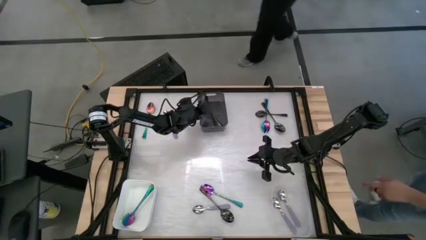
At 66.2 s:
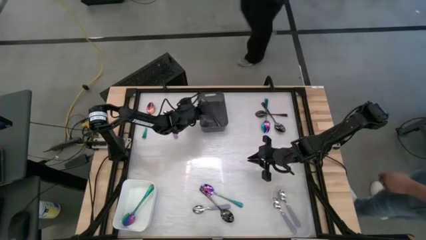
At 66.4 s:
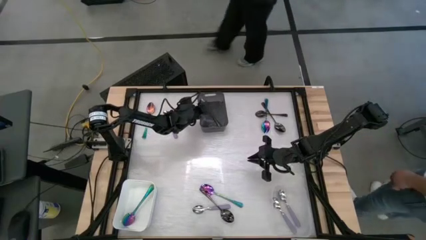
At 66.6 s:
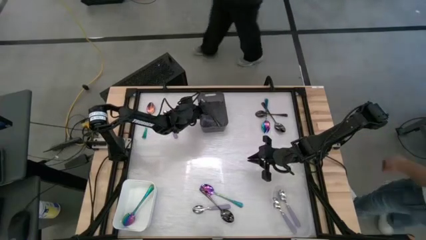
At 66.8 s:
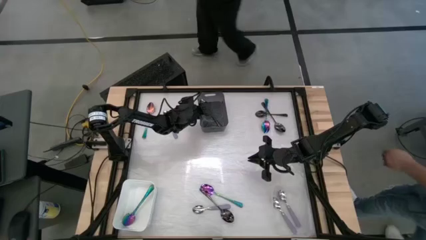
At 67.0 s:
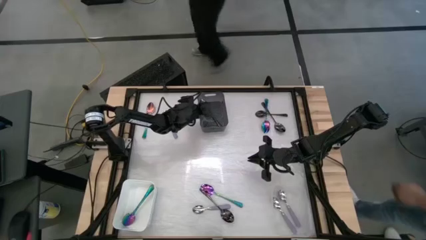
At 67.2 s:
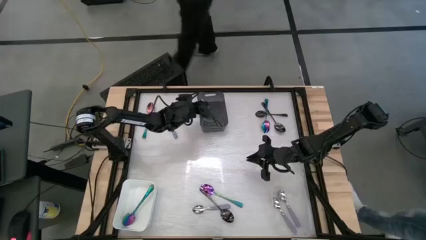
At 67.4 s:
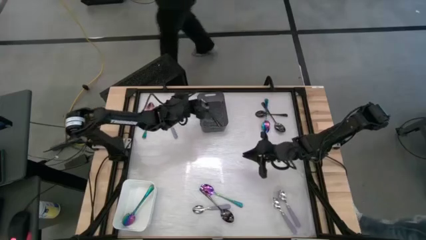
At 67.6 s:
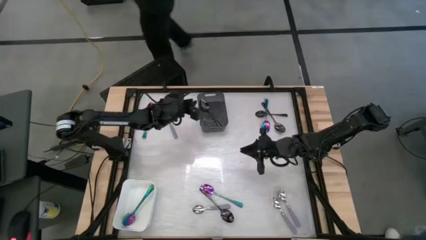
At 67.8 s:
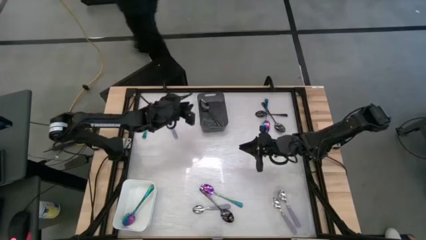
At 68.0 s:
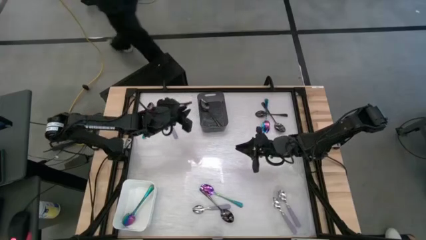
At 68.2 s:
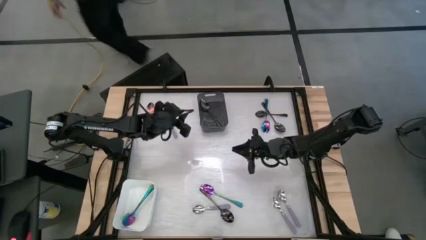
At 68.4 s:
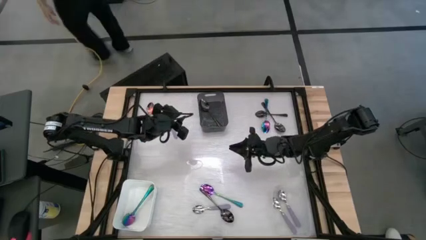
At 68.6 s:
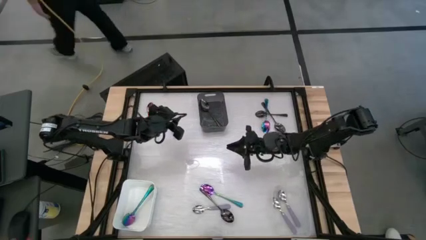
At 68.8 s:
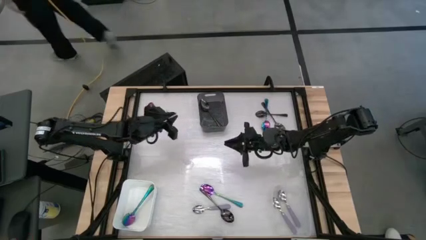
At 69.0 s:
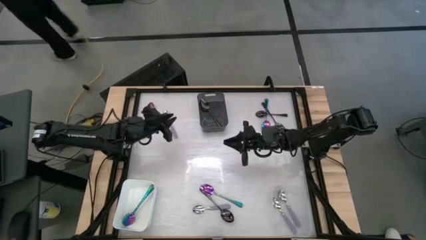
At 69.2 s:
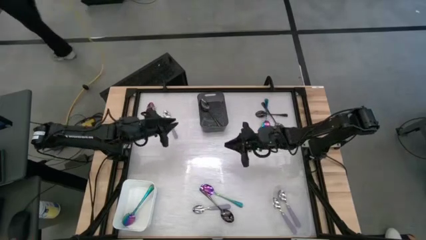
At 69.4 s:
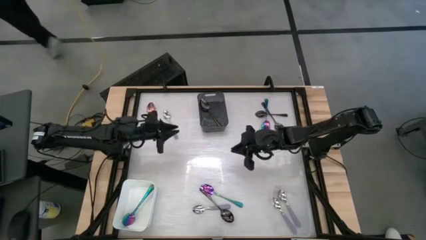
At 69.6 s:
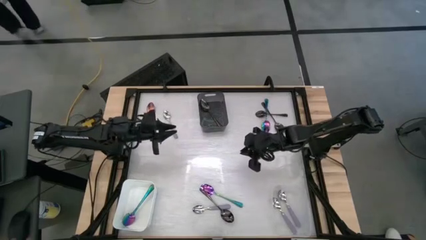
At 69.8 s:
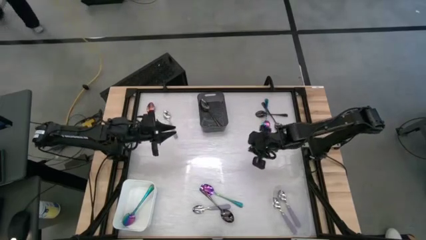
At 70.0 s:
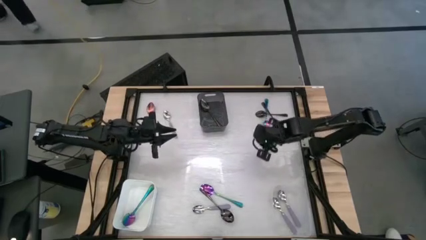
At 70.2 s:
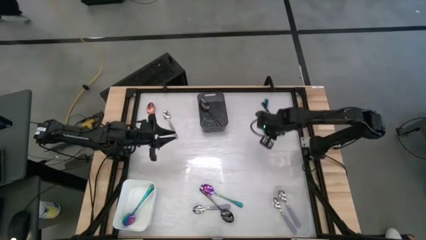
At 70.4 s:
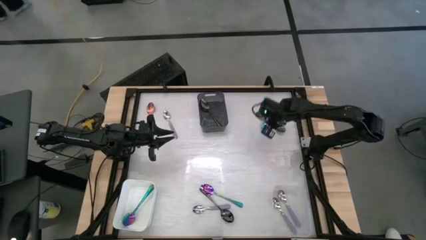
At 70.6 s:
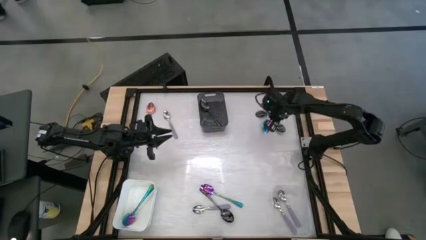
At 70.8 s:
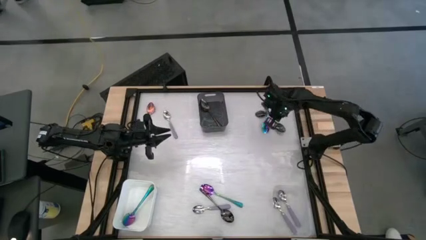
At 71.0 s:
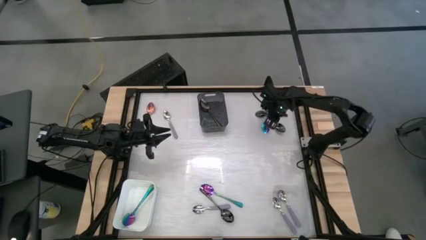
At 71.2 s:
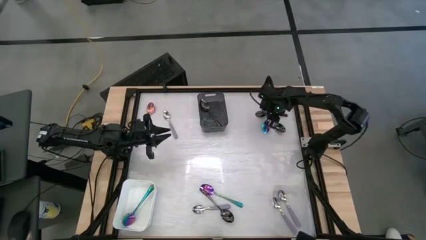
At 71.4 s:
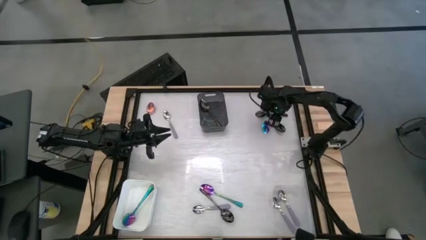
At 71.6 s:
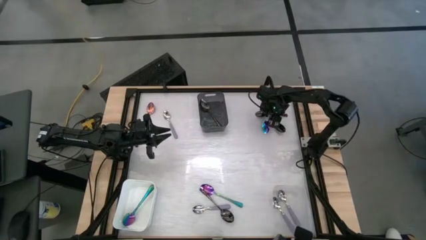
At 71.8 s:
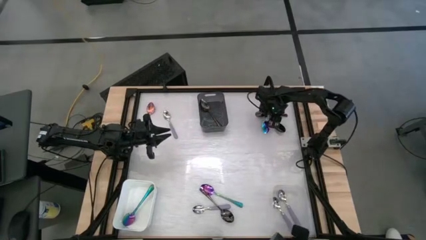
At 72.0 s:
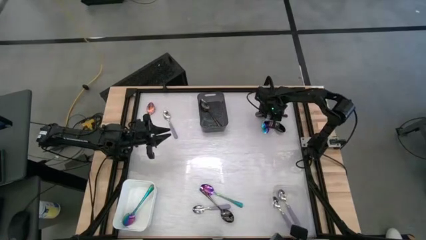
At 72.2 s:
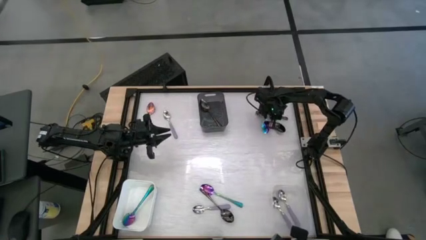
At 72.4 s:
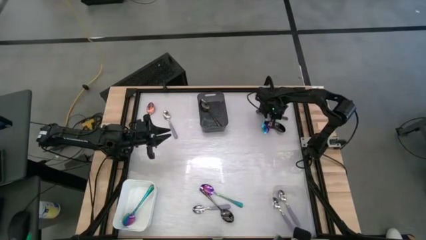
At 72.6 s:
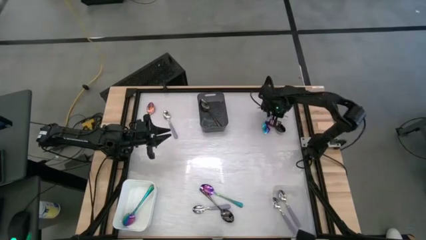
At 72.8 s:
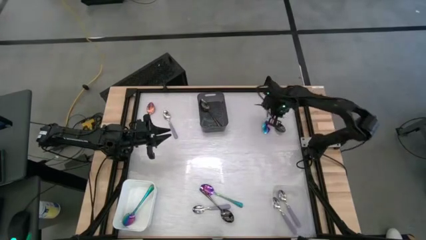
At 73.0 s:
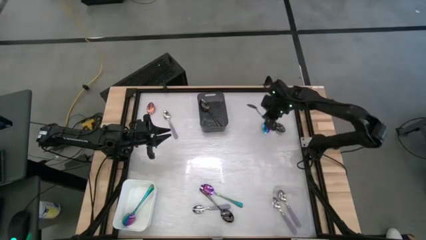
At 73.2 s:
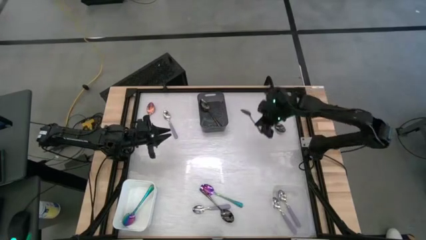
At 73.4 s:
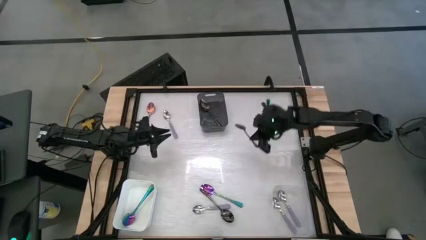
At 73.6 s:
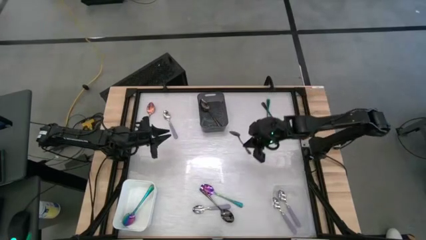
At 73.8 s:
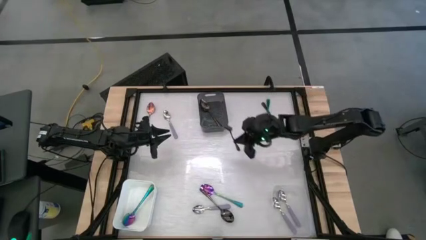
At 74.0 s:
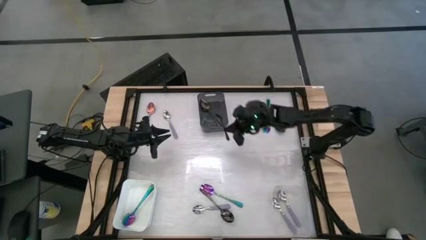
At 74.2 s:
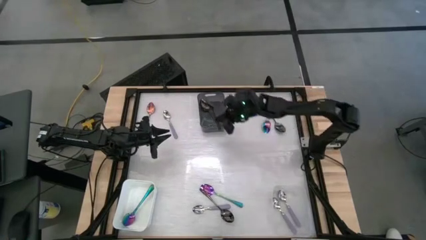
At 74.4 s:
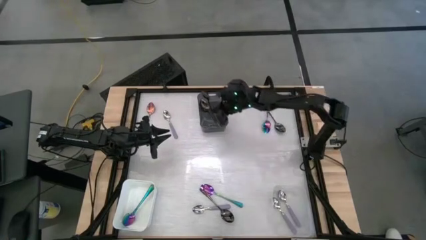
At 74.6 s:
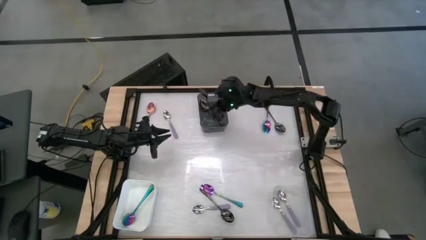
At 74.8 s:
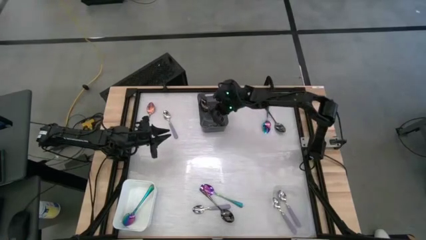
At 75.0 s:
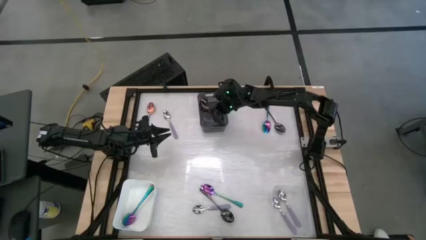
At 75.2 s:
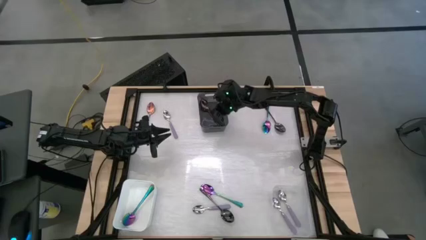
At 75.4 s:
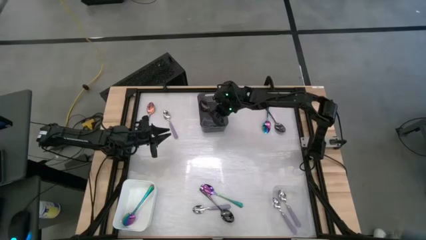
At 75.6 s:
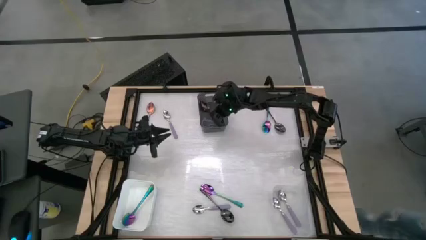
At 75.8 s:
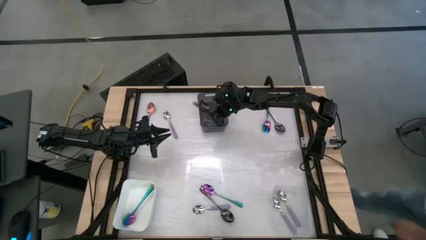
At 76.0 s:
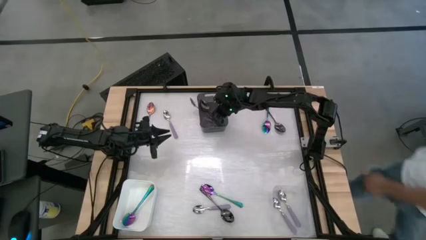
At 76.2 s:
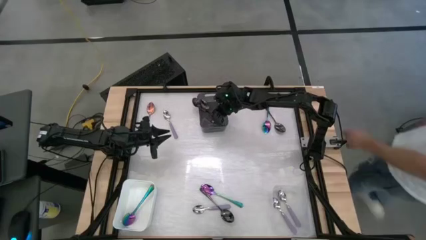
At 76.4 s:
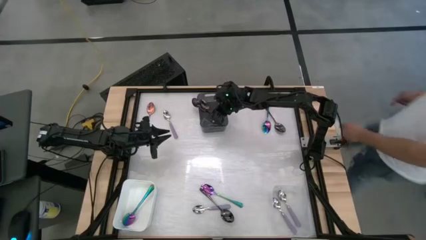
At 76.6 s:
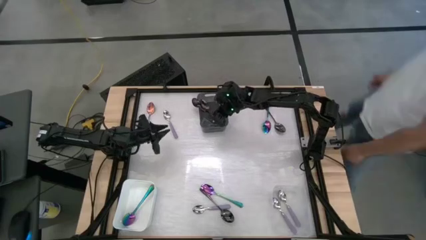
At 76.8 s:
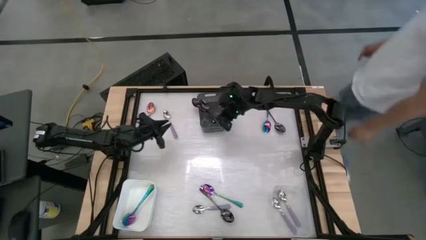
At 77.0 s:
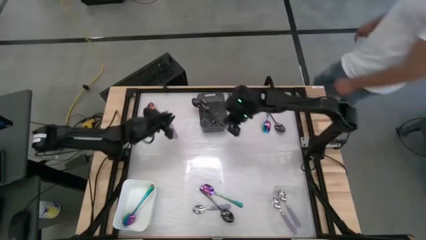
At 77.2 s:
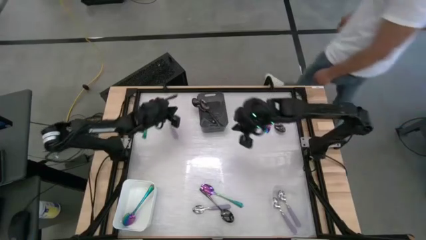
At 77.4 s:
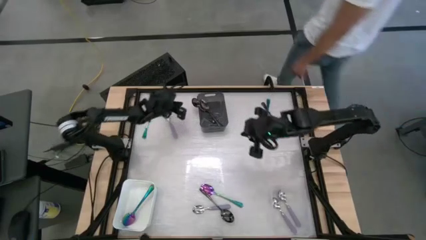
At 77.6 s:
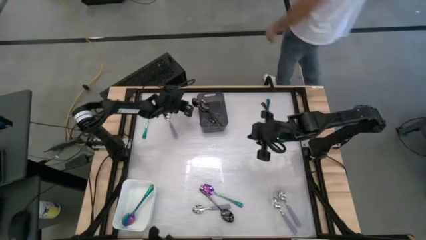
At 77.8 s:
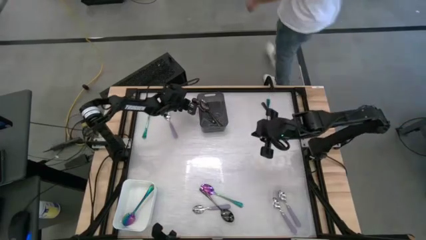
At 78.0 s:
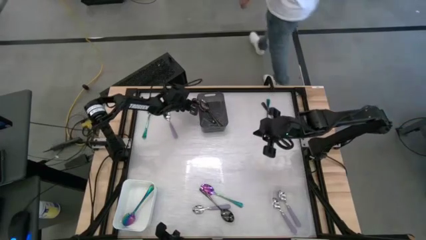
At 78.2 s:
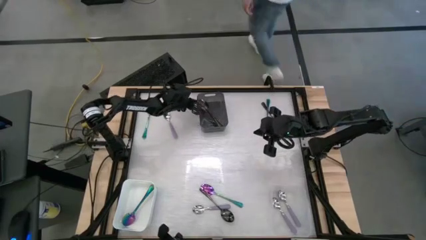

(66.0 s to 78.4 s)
Task: Sort silverware by color (type)
Put the black spoon into the black bin

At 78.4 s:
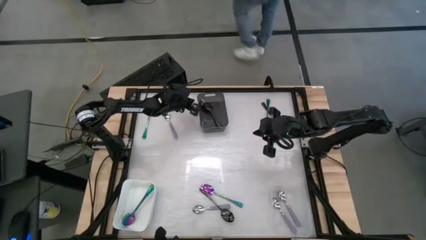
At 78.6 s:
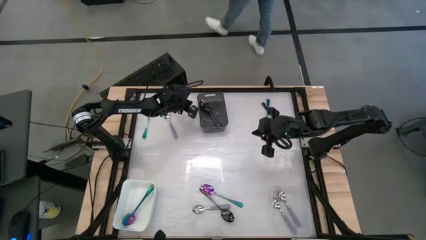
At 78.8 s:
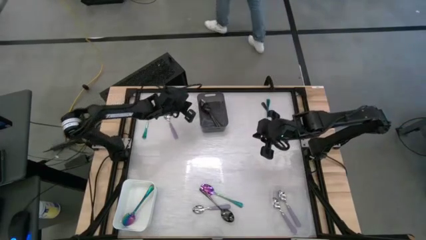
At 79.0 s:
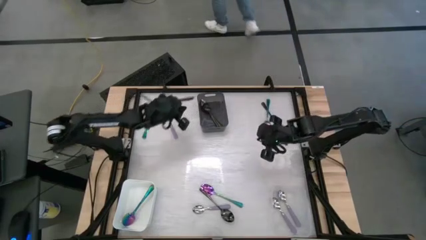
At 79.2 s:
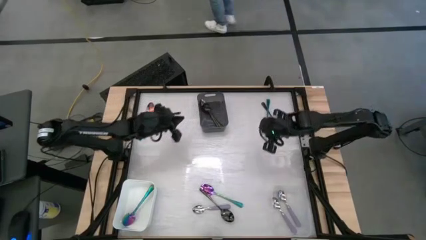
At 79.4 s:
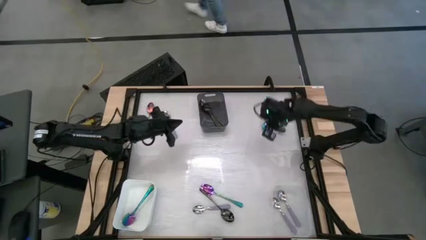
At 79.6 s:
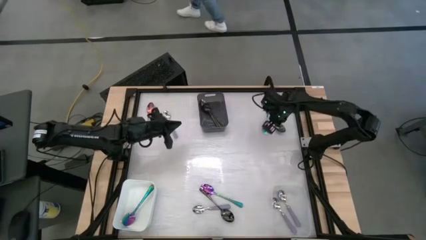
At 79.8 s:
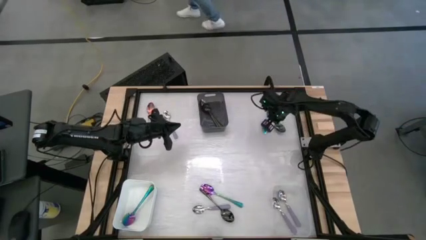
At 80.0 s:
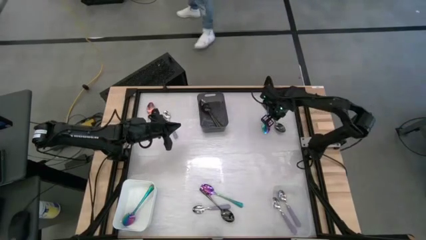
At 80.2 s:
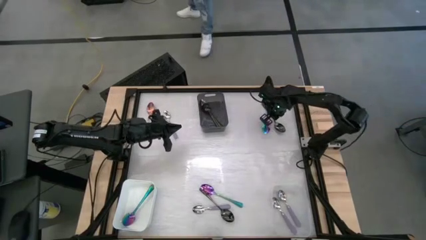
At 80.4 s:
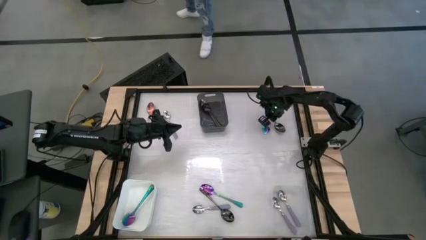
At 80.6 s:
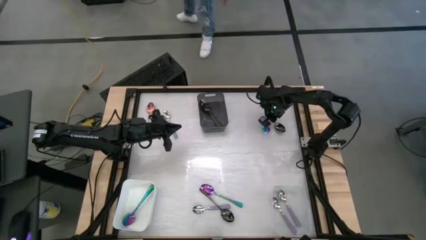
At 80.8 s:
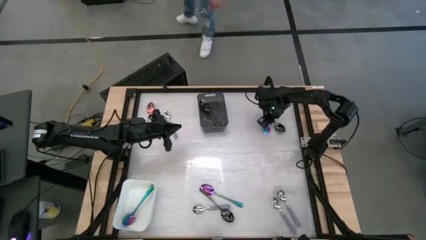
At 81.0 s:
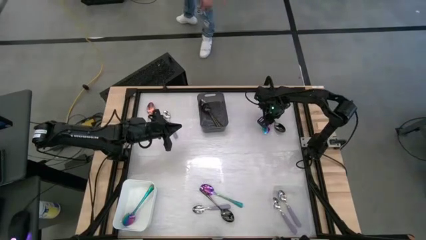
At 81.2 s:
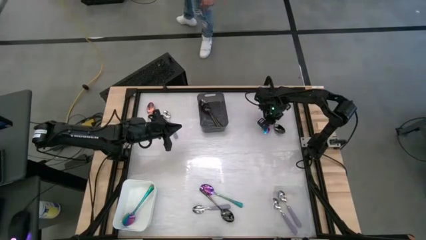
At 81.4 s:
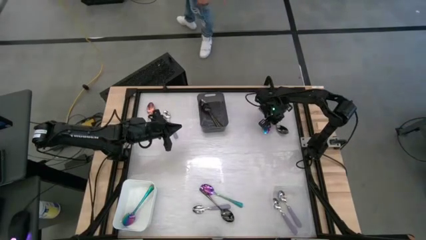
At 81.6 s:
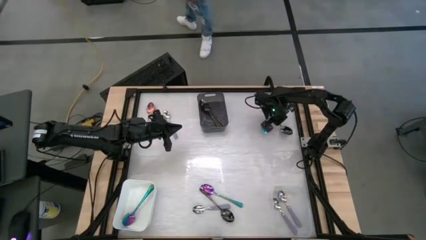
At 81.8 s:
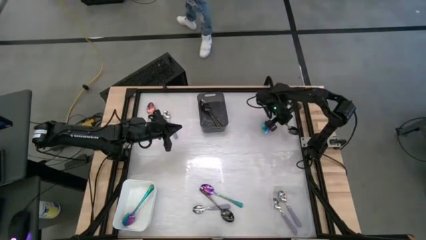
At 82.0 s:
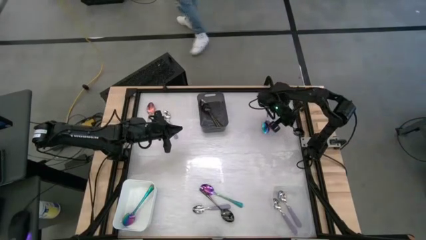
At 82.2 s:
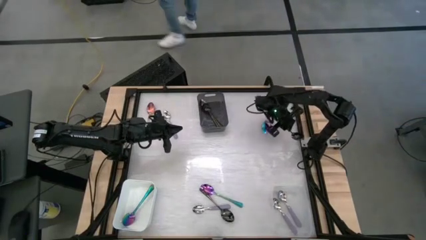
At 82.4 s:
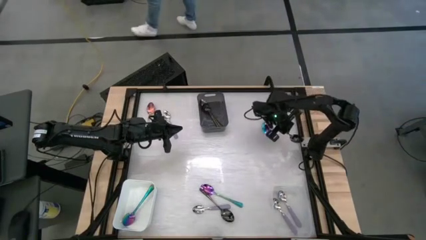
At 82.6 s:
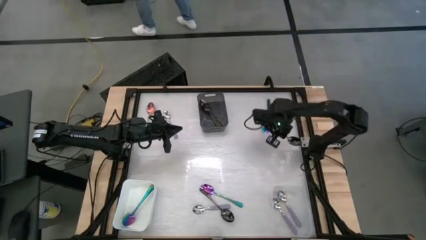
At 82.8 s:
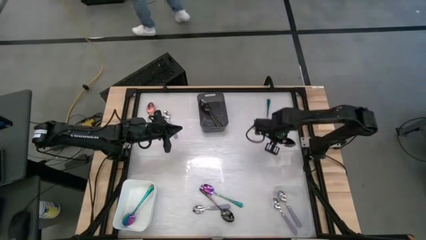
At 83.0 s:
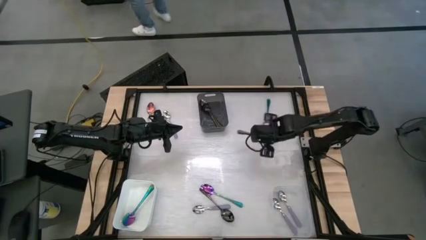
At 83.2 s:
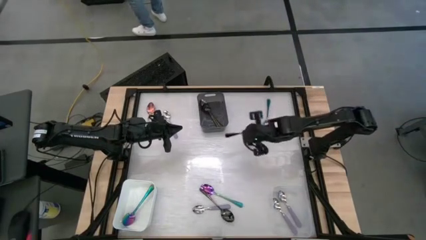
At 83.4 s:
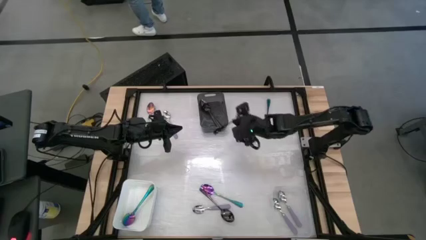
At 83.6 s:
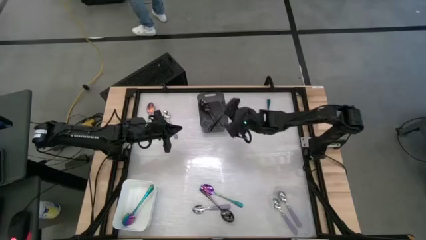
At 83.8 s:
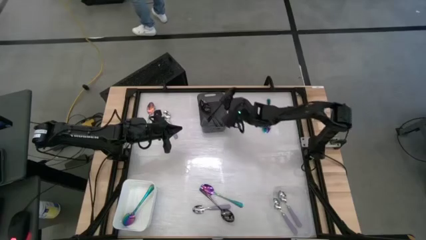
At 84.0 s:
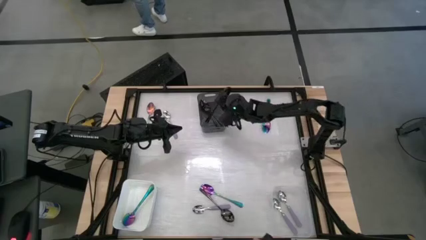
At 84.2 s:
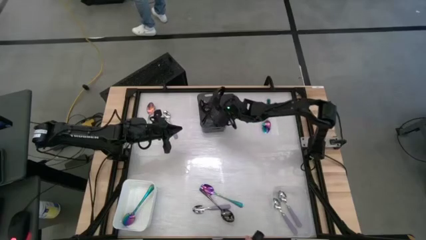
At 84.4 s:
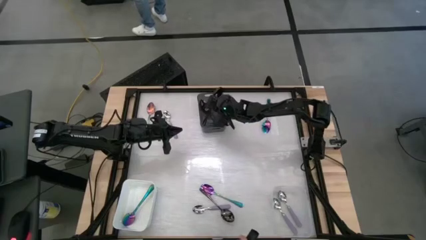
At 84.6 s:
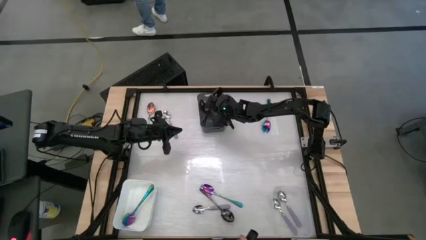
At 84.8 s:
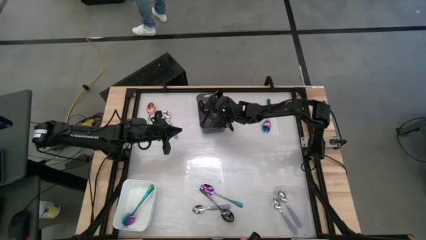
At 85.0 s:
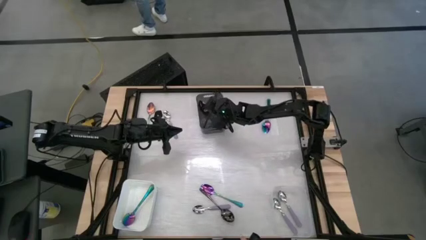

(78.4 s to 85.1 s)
Put the black spoon into the black bin
